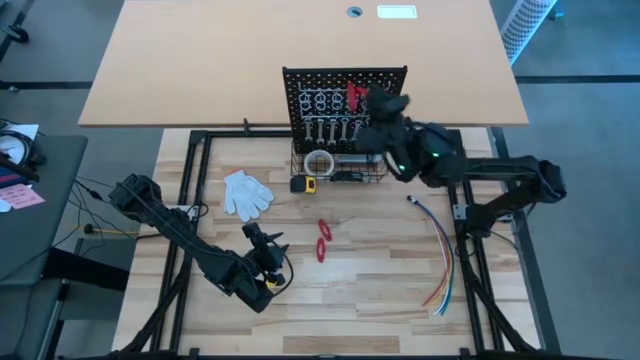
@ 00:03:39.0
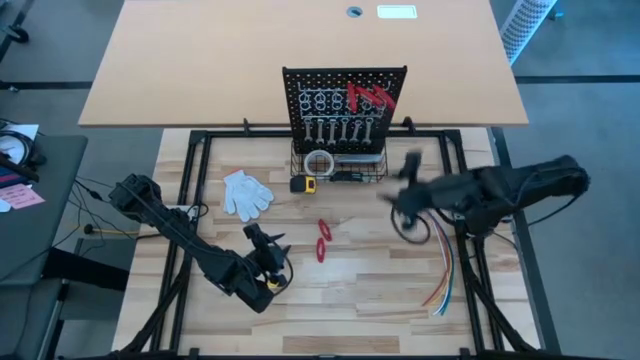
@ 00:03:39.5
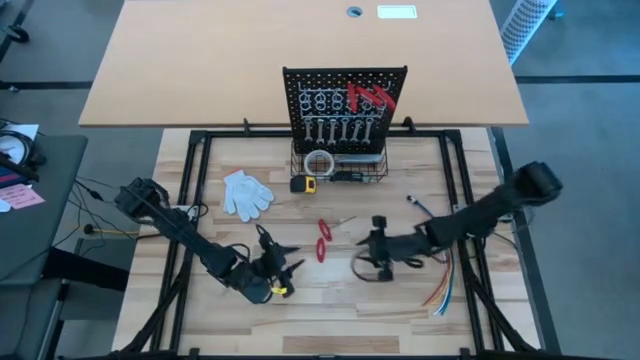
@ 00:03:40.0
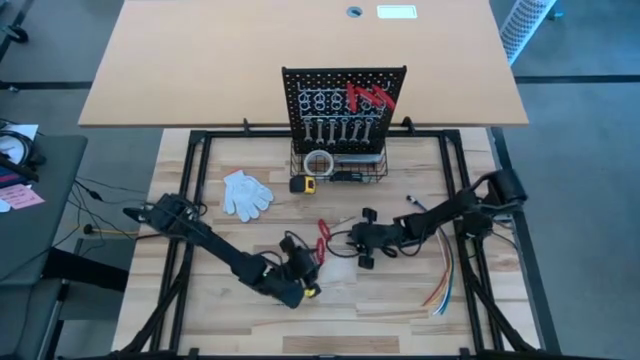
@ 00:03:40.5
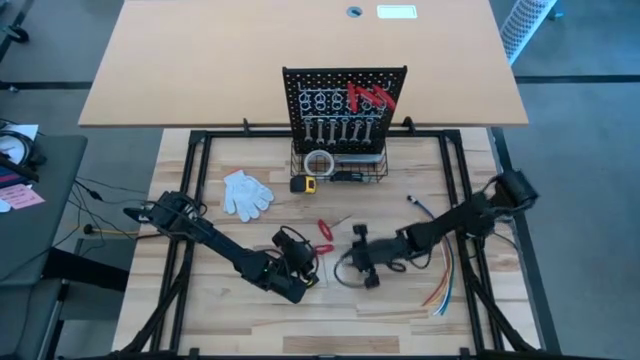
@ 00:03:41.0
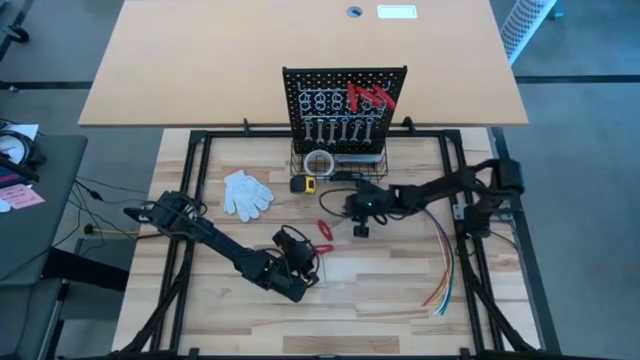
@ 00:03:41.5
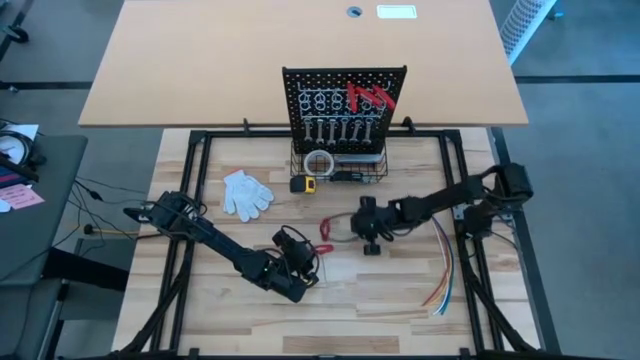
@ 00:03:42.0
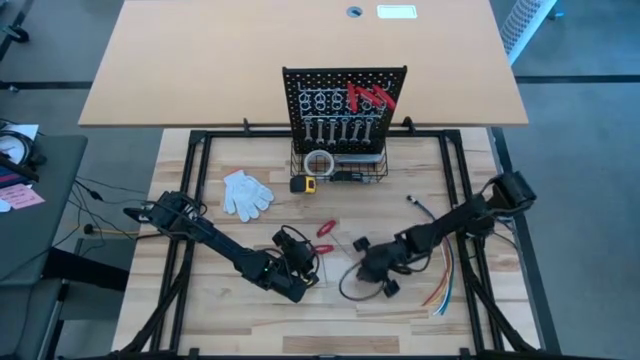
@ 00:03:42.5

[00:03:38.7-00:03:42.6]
Task: Hang tools onto peg board
Adjust the red allen wrenches on the table

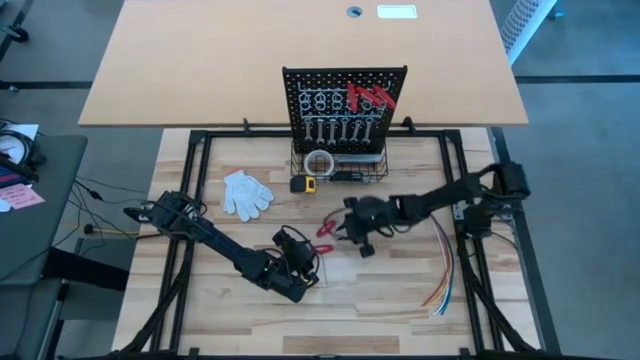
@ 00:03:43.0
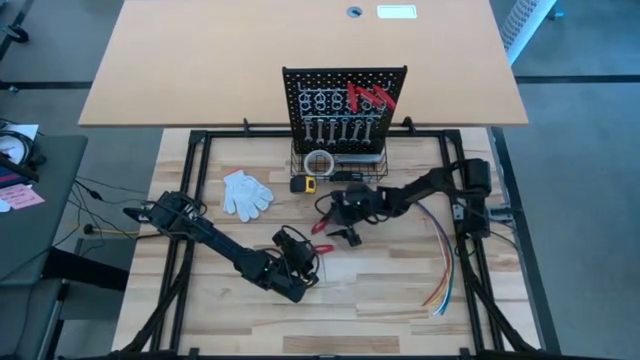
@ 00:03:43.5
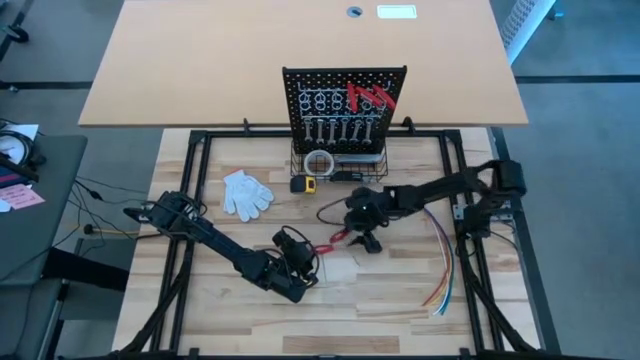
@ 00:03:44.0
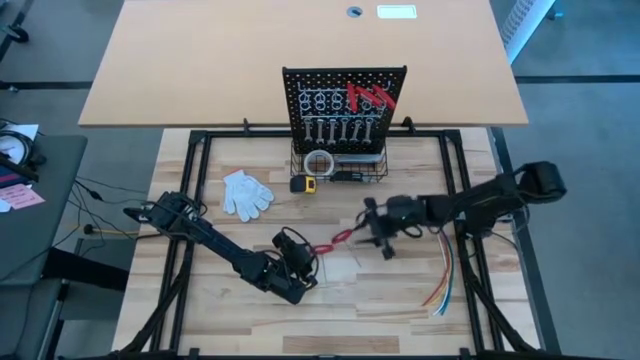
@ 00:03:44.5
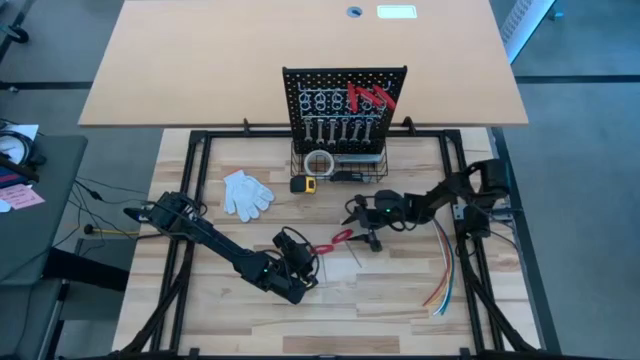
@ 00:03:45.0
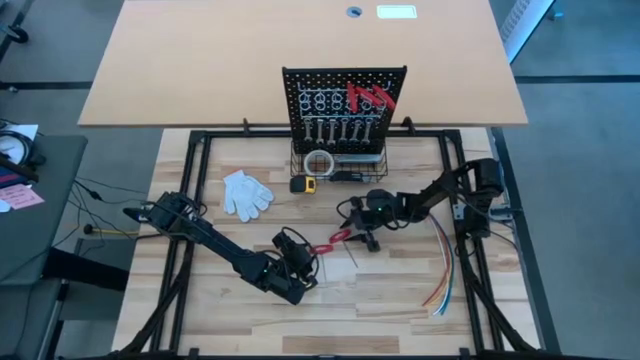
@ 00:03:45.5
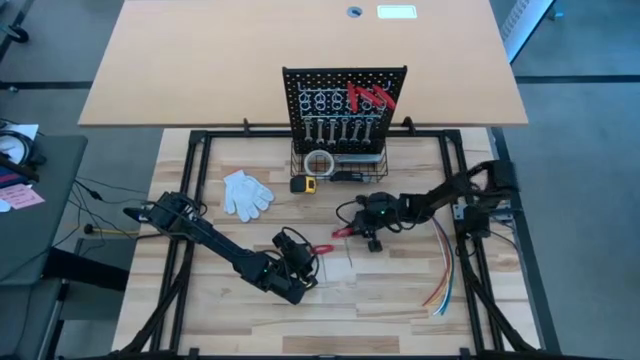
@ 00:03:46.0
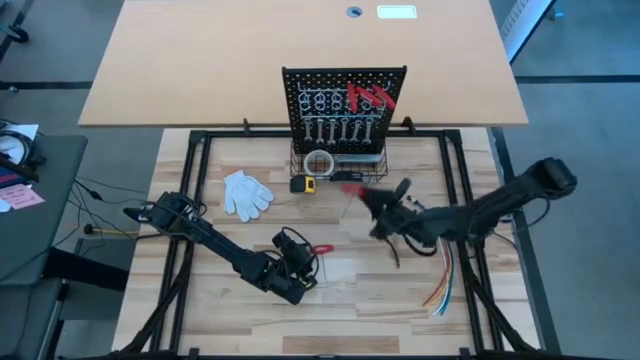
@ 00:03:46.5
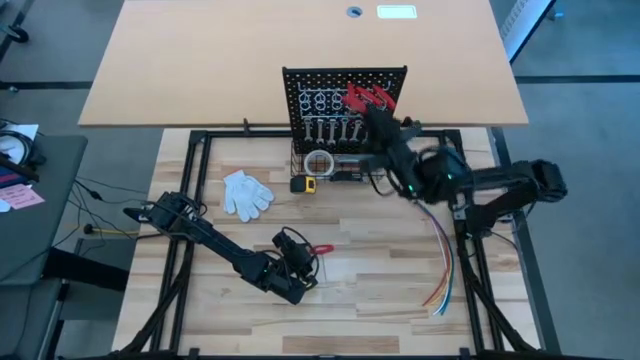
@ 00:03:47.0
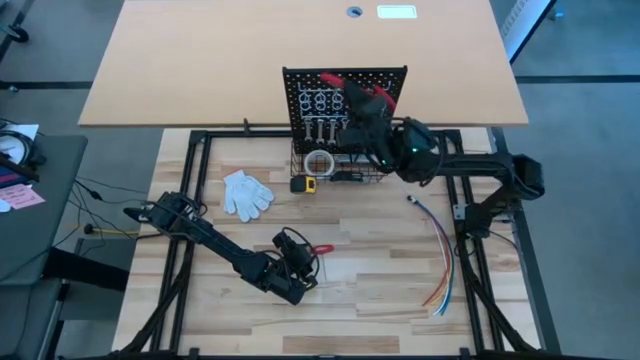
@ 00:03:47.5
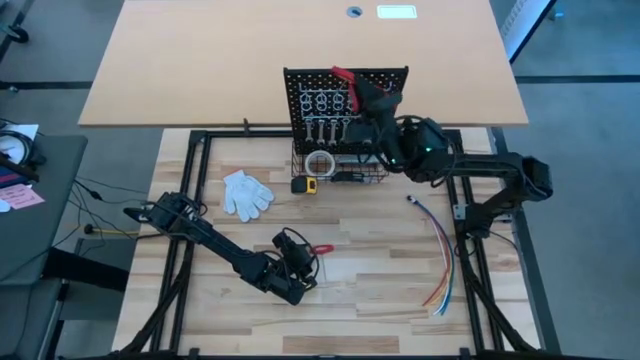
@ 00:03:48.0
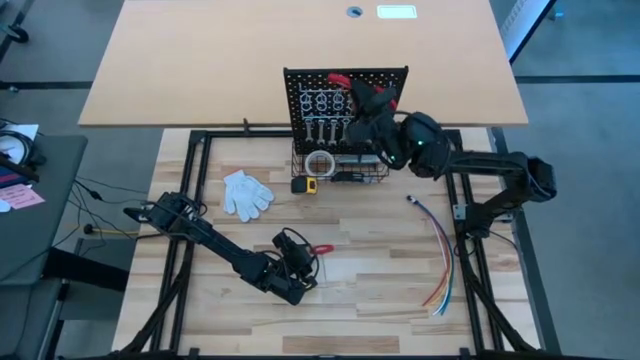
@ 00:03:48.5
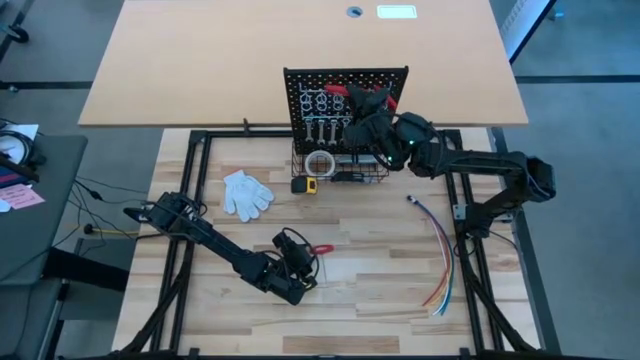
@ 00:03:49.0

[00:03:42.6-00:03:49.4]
Hang the red allen wrench on the peg board

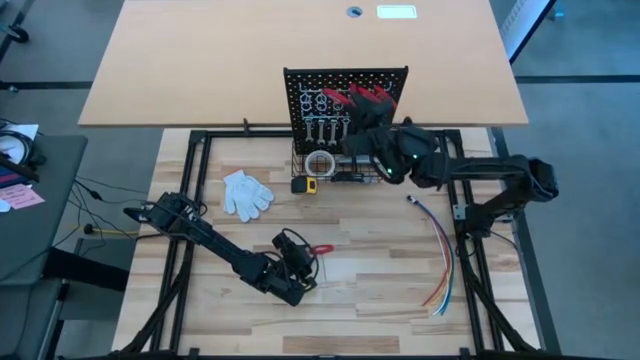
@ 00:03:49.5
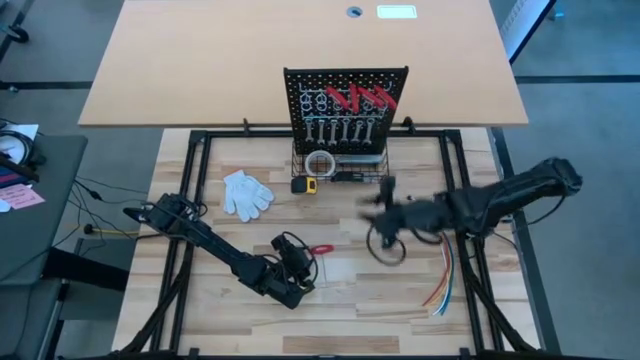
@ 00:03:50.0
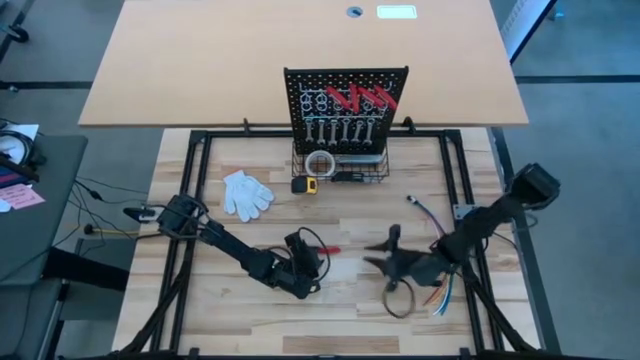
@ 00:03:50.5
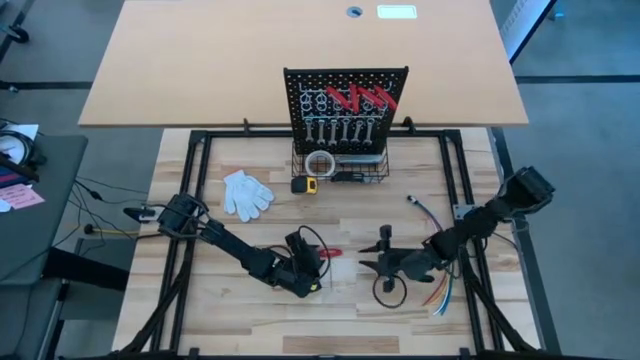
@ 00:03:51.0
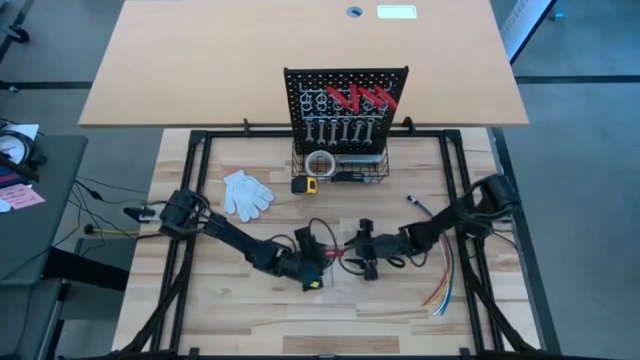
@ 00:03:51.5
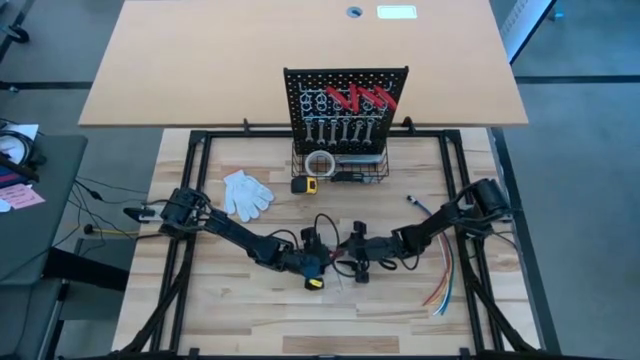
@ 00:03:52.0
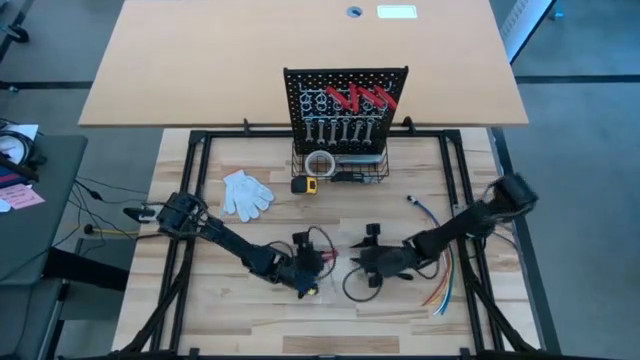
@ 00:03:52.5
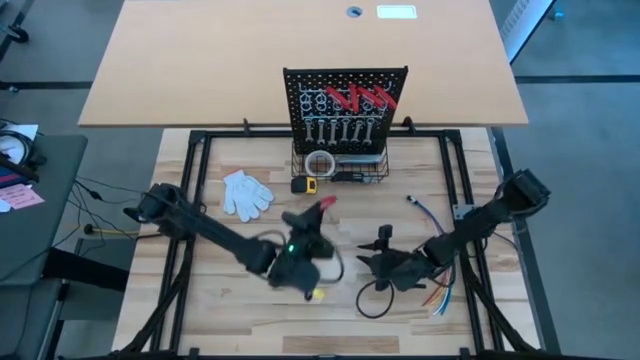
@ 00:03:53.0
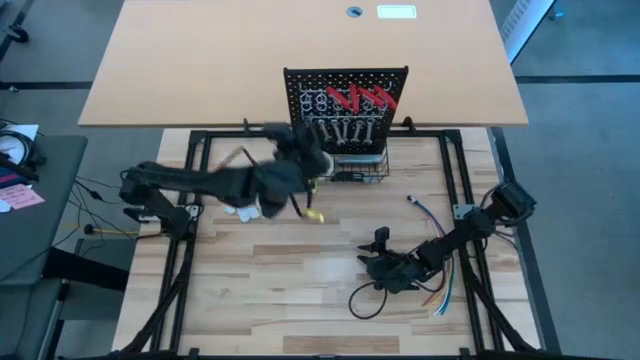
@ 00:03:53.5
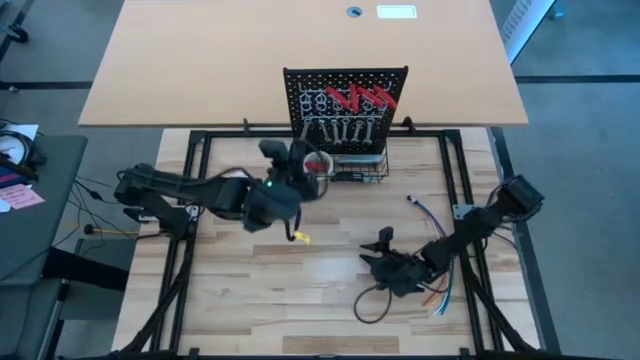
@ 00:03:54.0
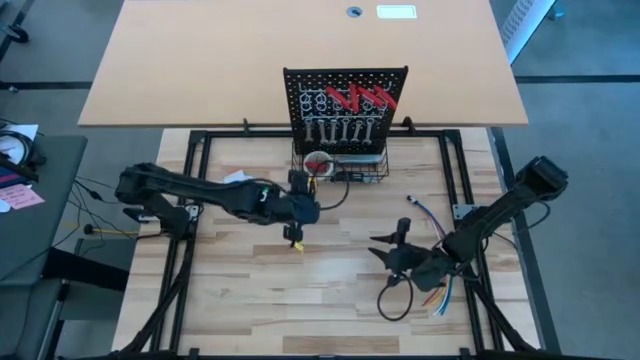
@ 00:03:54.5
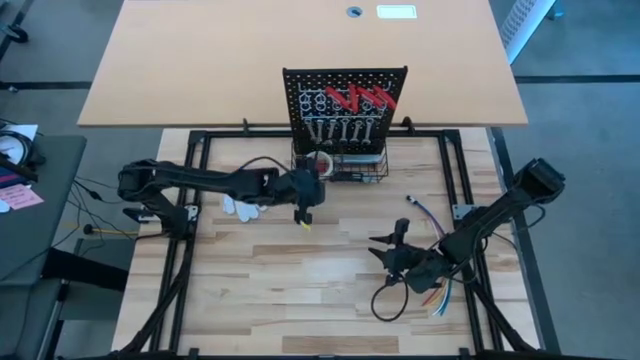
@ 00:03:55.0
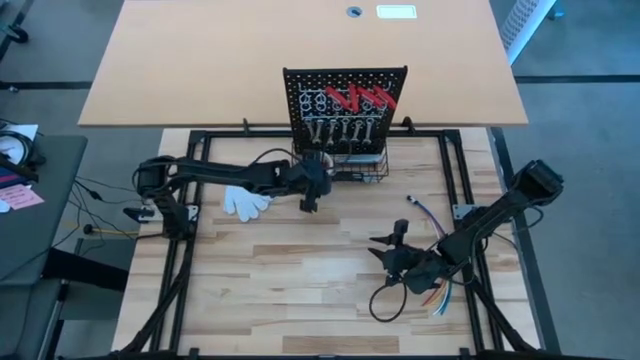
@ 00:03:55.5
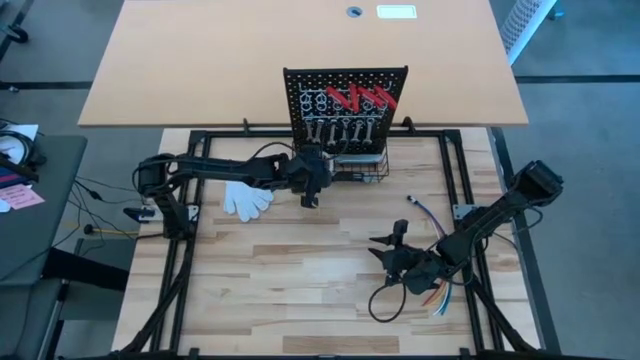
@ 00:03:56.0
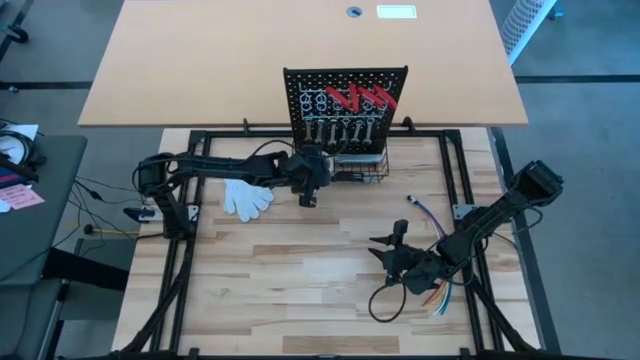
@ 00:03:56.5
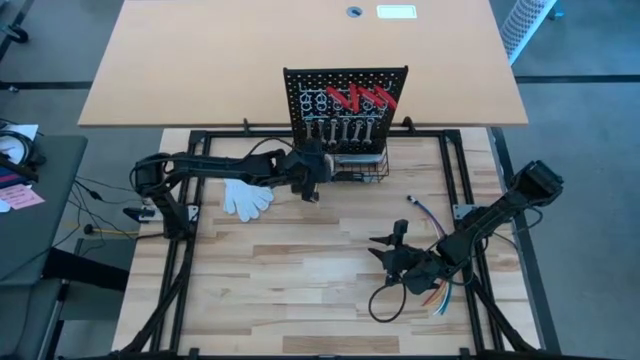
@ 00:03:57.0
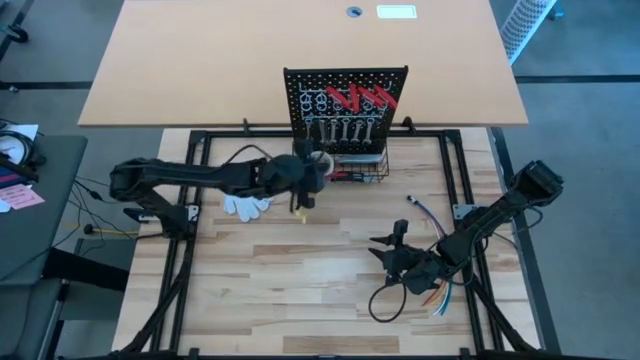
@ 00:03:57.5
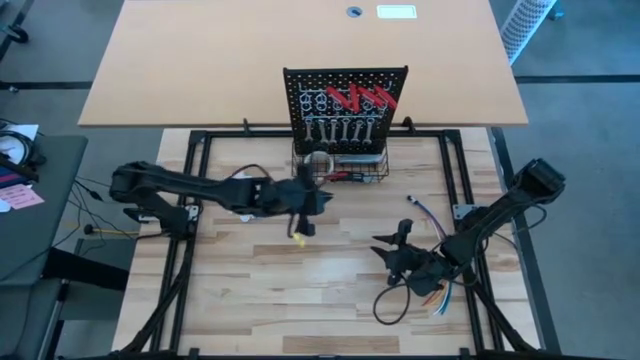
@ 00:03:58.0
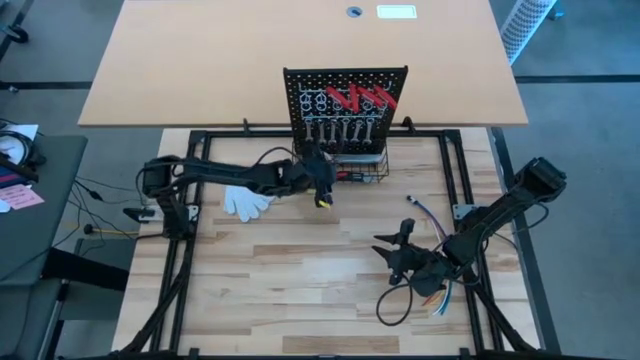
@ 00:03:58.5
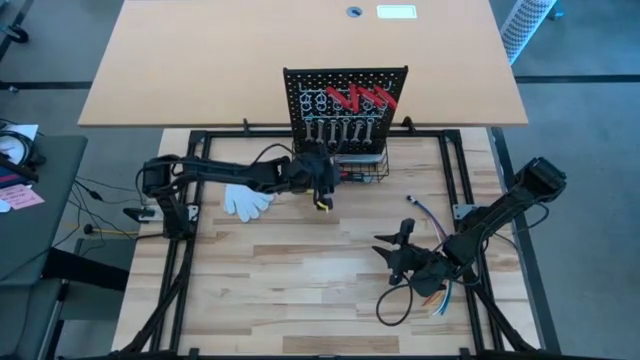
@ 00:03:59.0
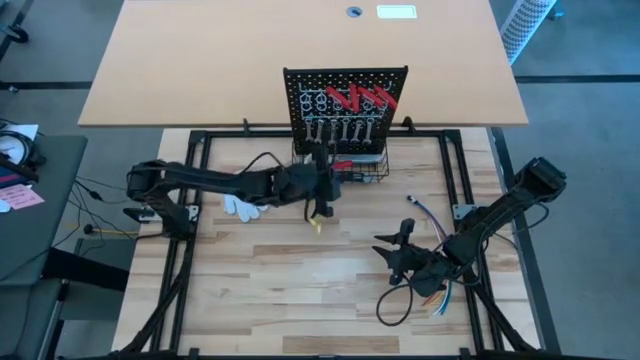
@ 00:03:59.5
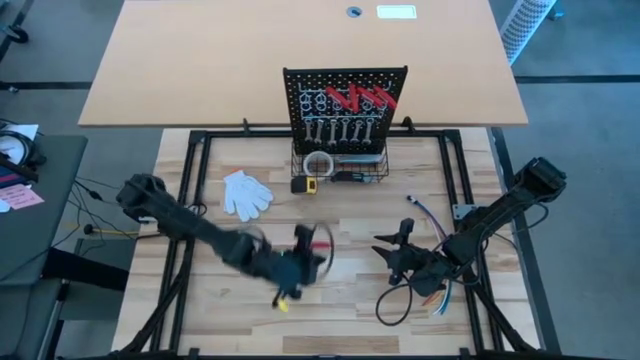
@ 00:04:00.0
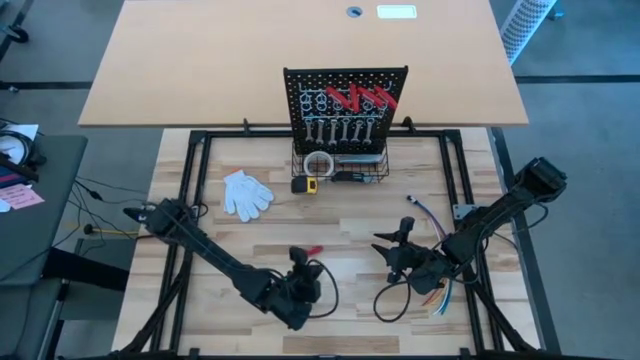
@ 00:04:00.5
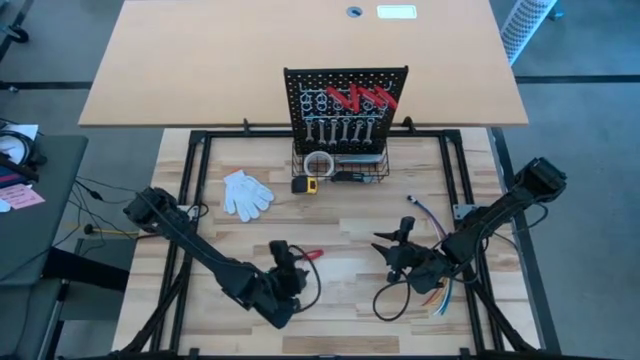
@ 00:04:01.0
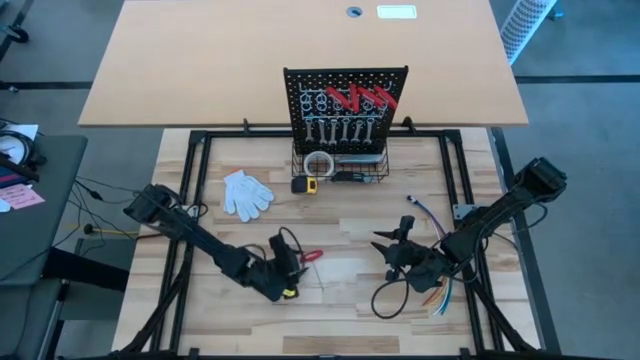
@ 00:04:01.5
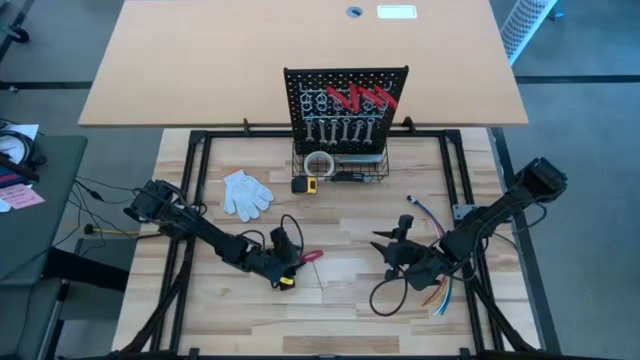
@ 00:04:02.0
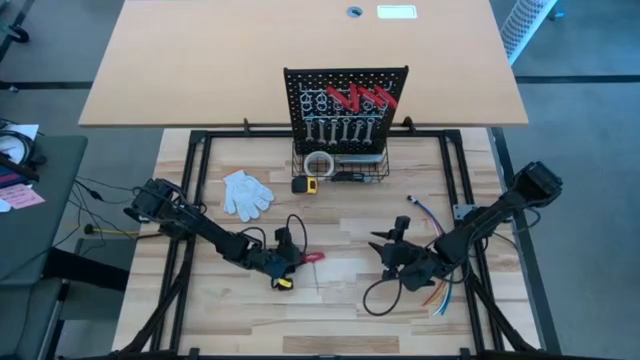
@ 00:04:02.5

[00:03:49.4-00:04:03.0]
Hang the red allen wrench on the peg board
